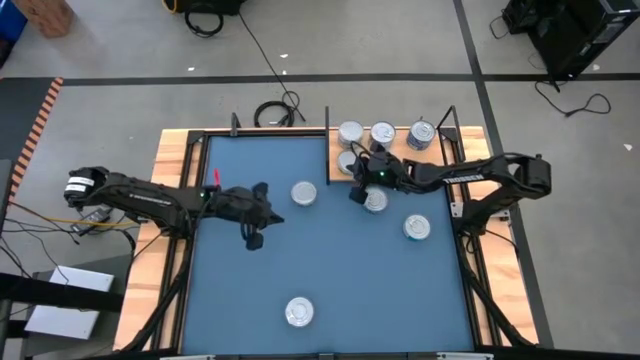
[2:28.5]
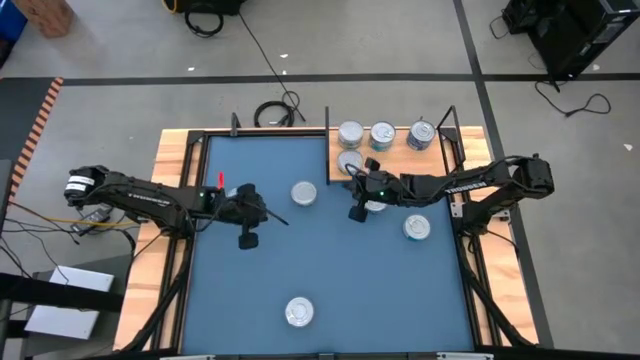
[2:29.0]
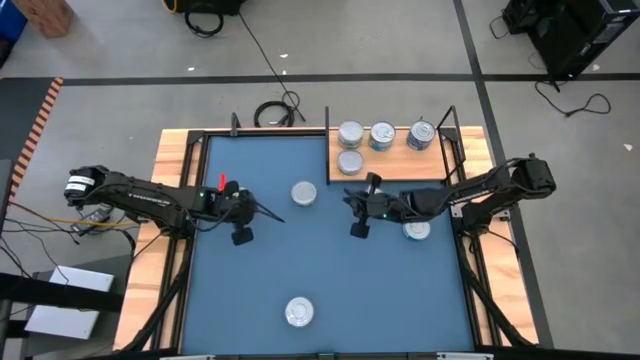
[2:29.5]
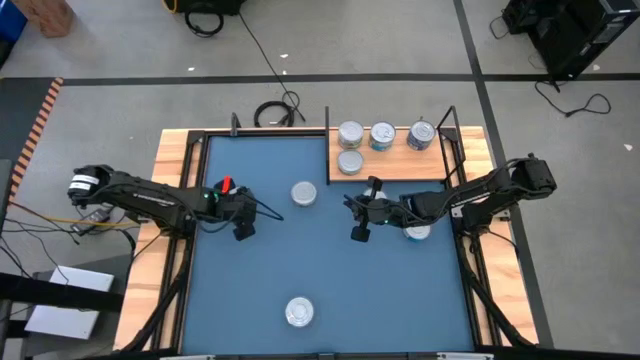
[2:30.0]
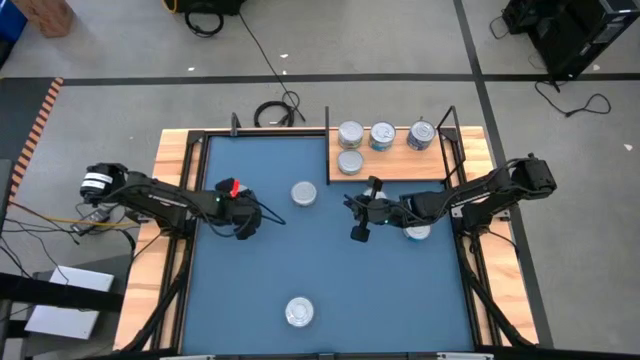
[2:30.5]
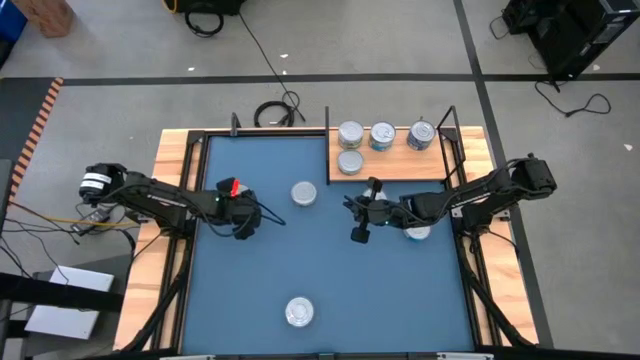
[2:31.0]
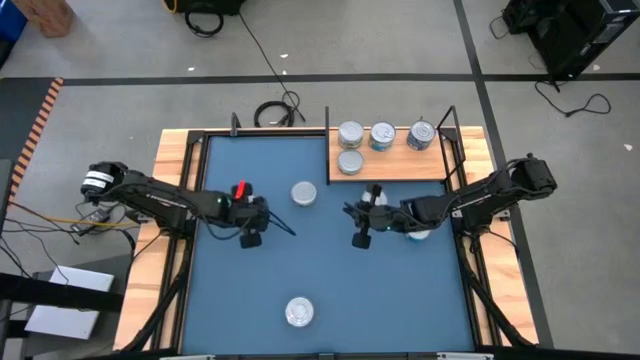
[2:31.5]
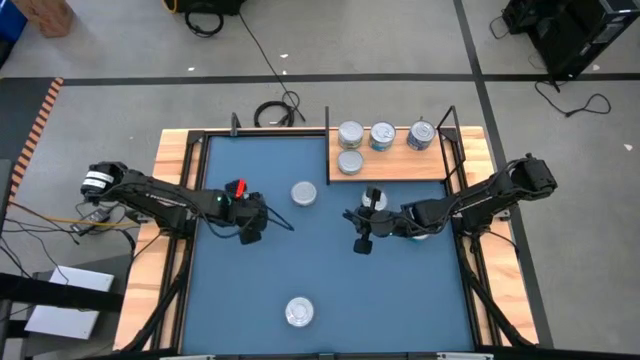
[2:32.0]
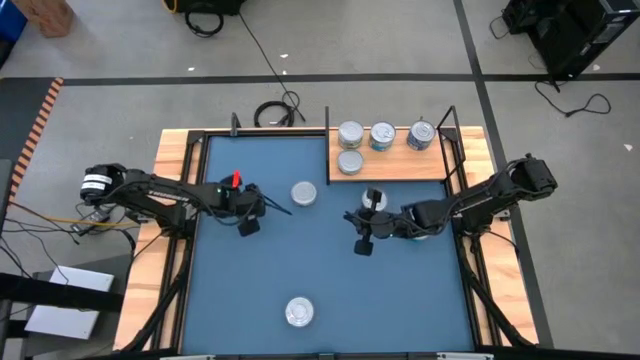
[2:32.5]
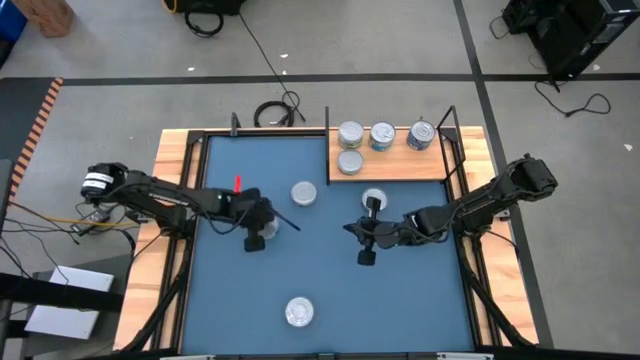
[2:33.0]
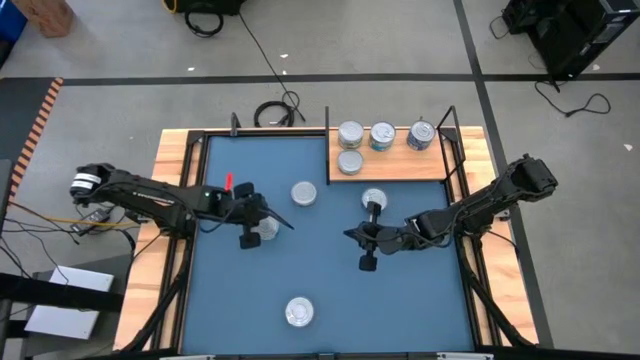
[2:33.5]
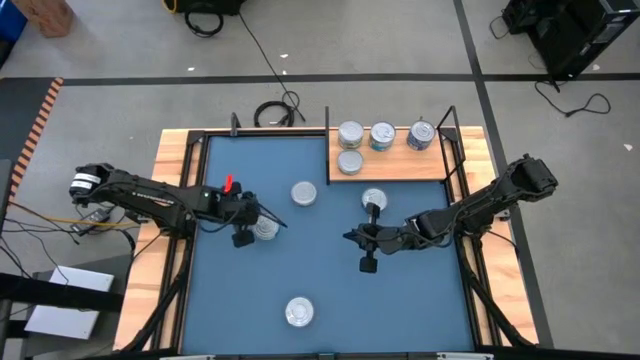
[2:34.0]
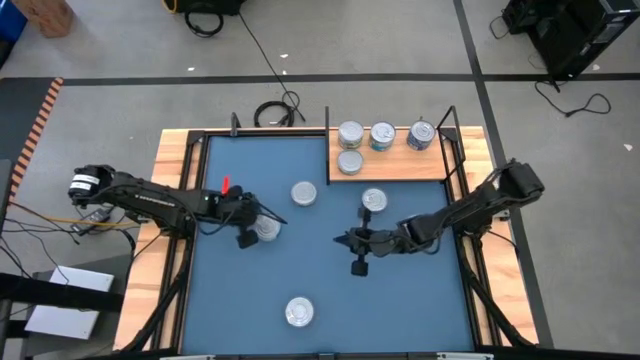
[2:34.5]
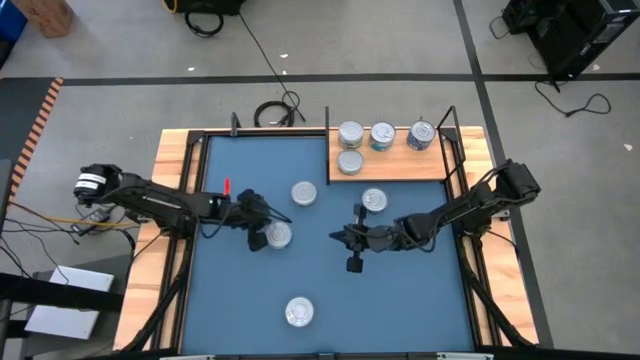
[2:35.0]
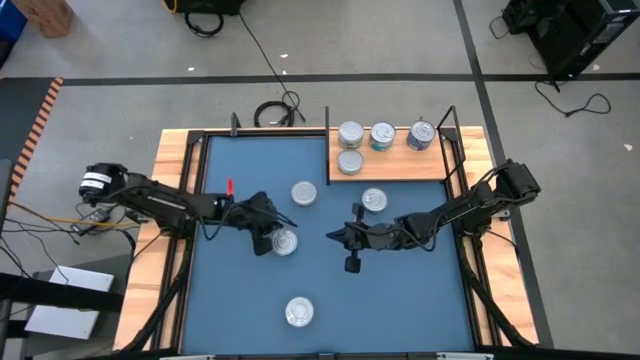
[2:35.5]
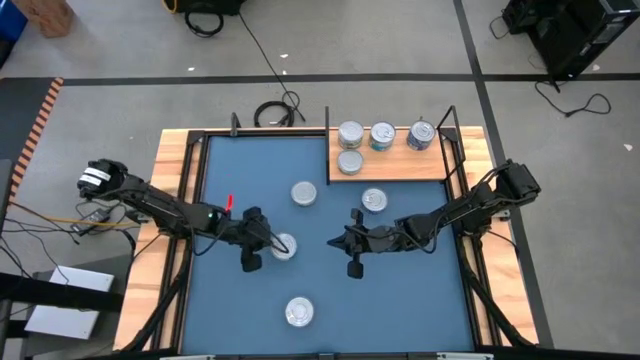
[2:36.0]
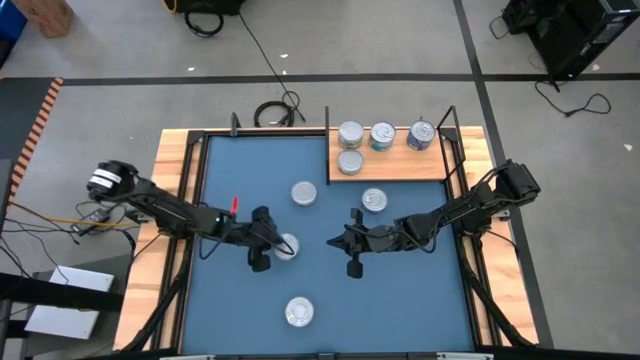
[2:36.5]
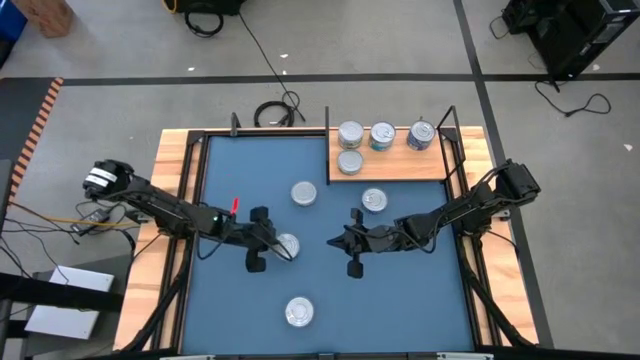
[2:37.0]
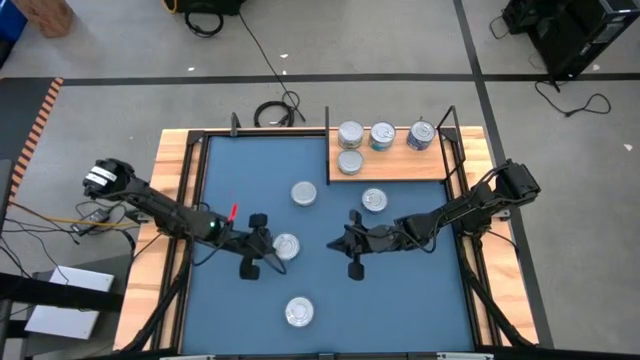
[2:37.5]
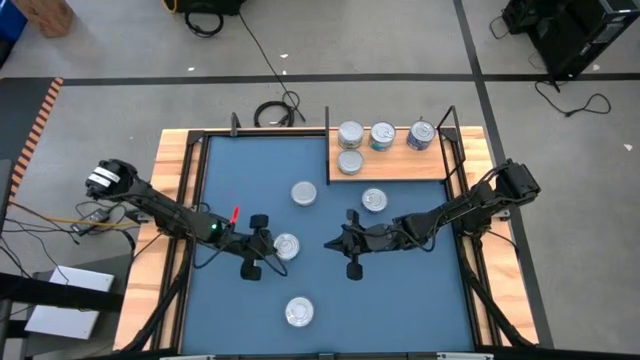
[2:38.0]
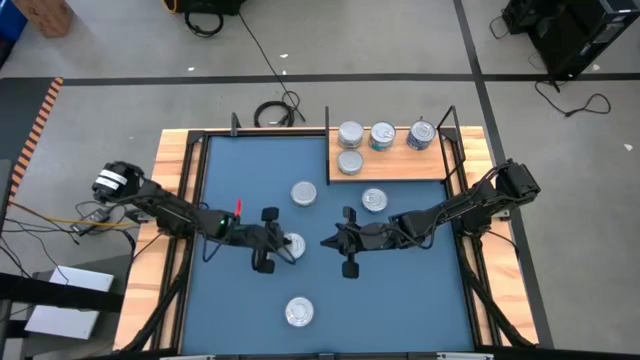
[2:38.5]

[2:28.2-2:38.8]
Task: Stack canned seafood by type on shelf
Put the left yellow and blue tuna can on the shelf aligned with the other yellow and blue tuna can

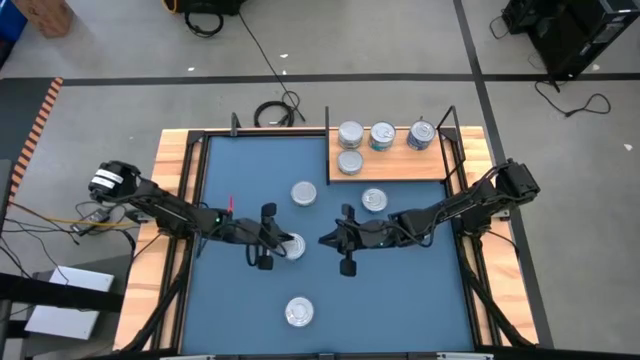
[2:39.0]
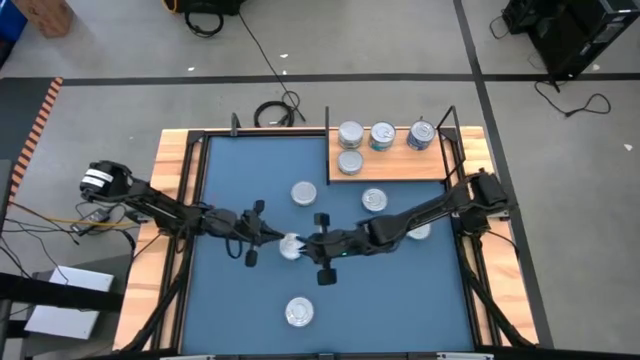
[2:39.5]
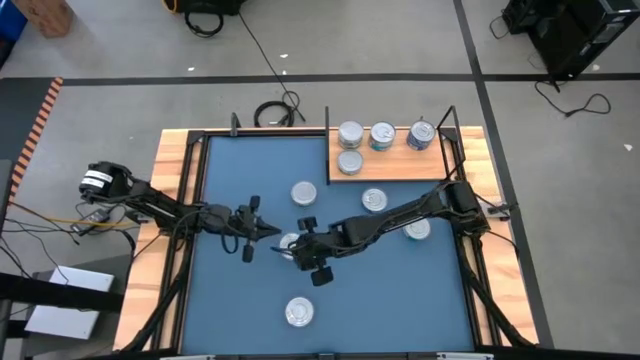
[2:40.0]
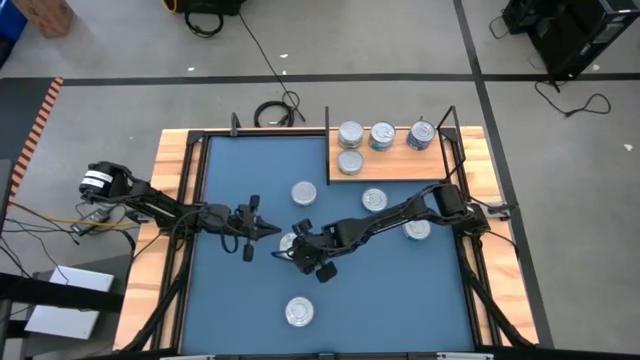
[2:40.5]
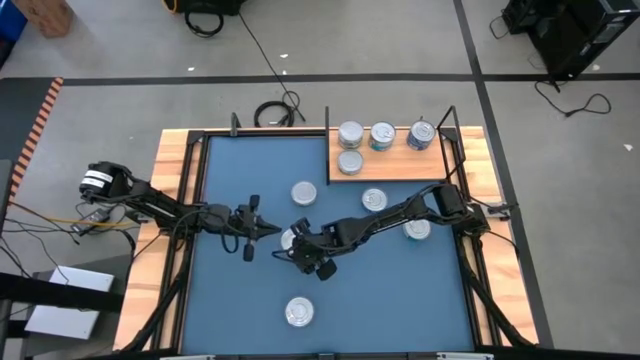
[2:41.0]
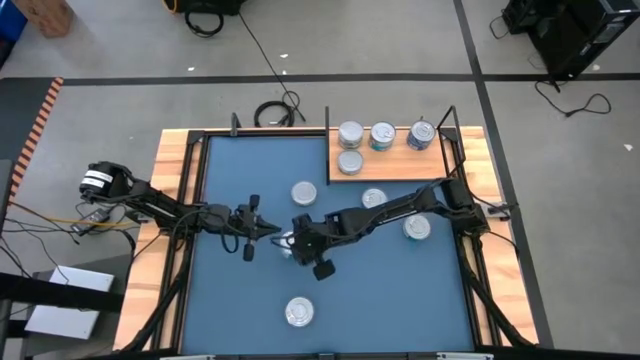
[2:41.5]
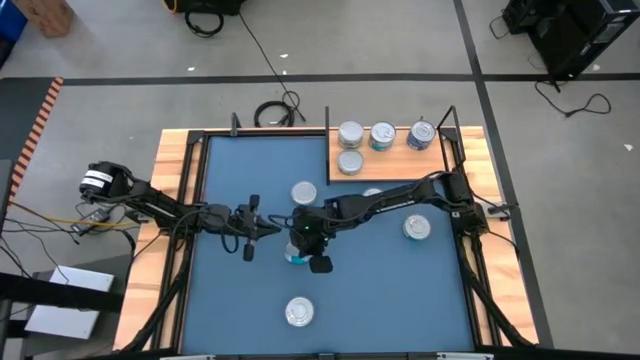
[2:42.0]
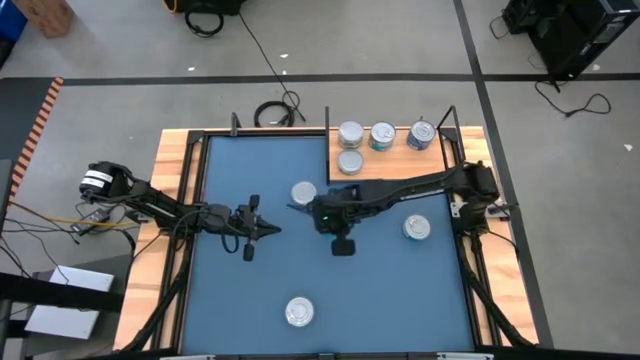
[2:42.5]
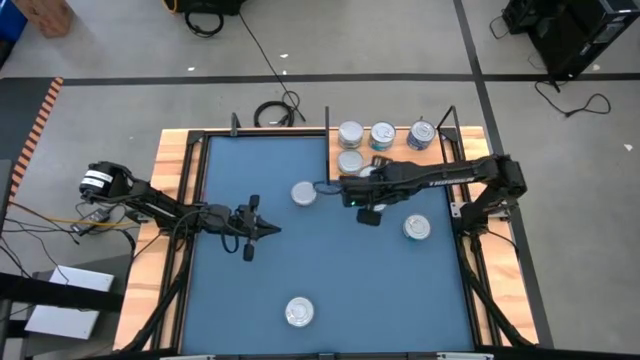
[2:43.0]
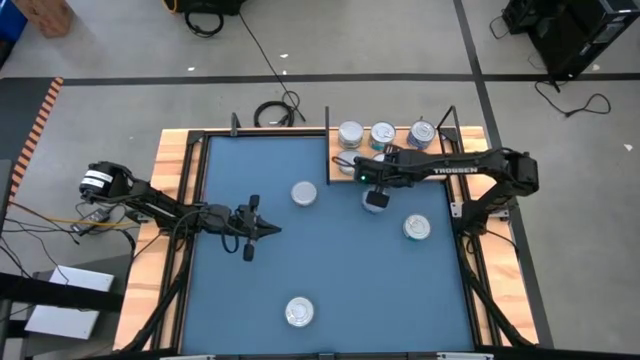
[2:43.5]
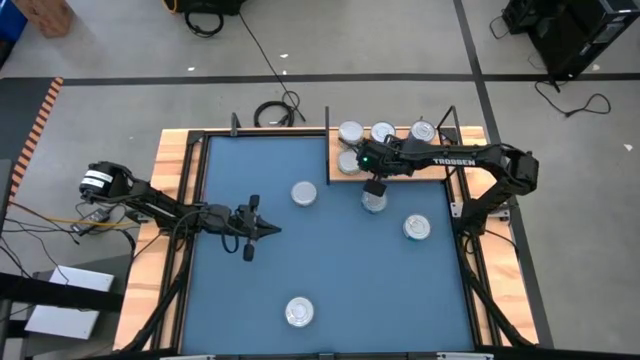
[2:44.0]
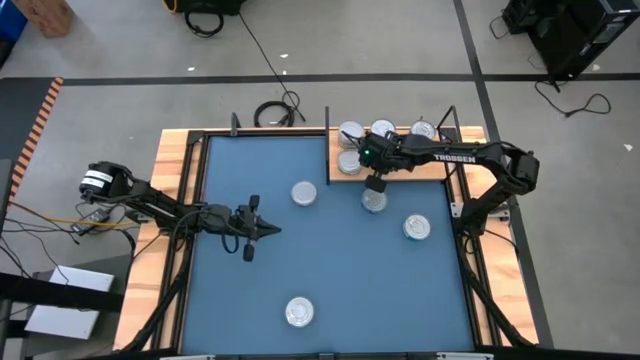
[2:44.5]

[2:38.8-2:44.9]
Put the yellow and blue tuna can on the shelf aligned with the other yellow and blue tuna can

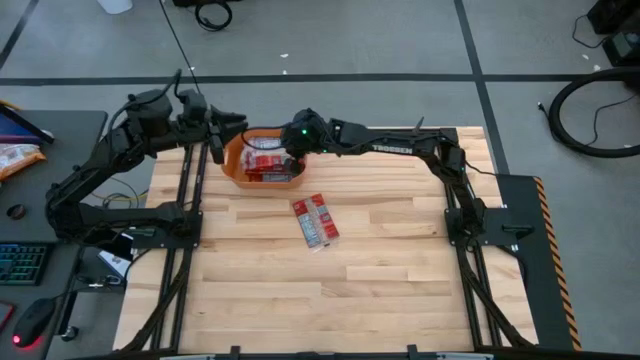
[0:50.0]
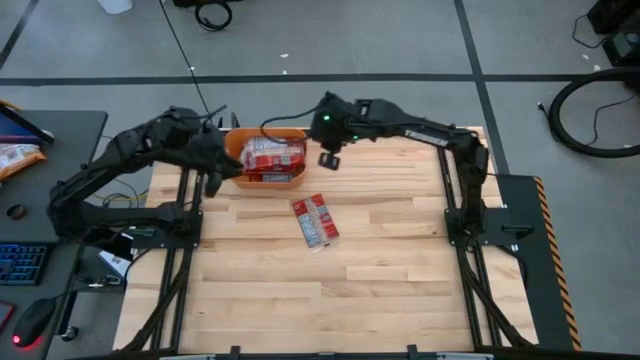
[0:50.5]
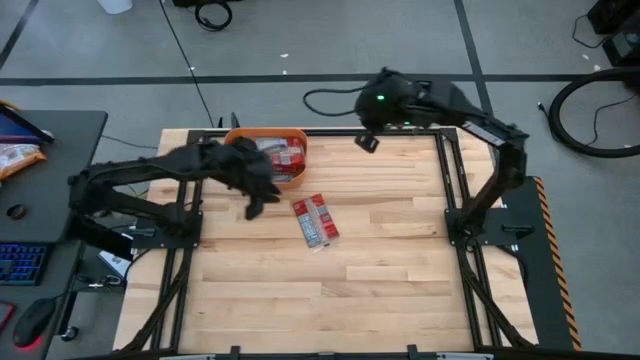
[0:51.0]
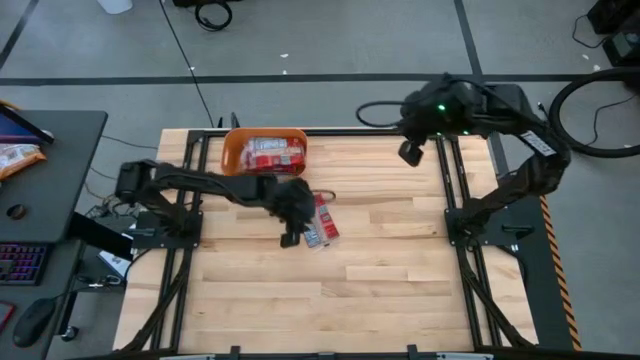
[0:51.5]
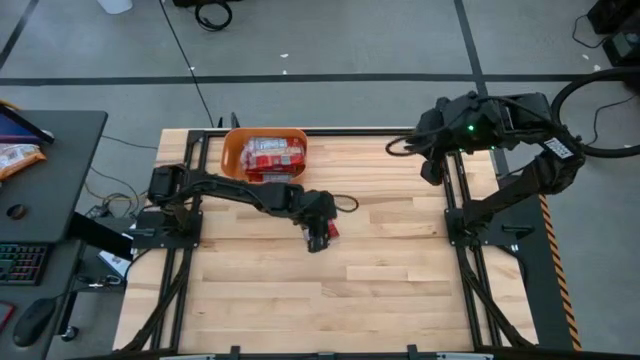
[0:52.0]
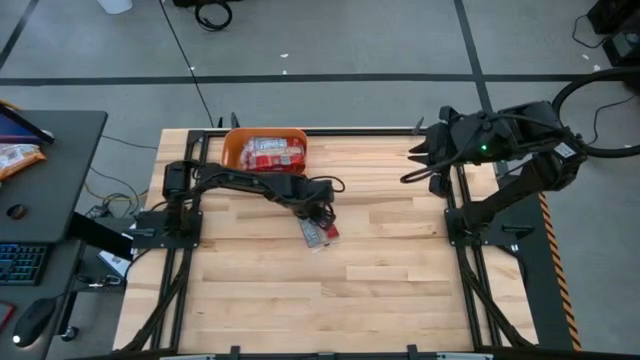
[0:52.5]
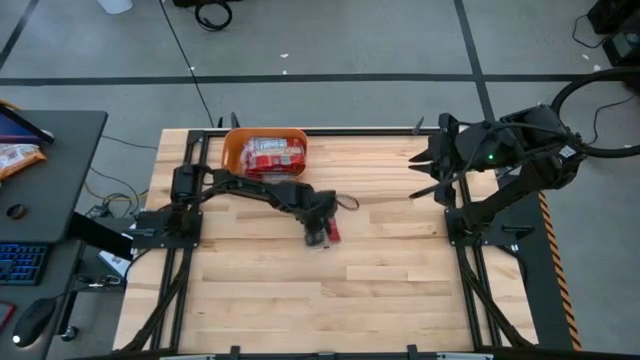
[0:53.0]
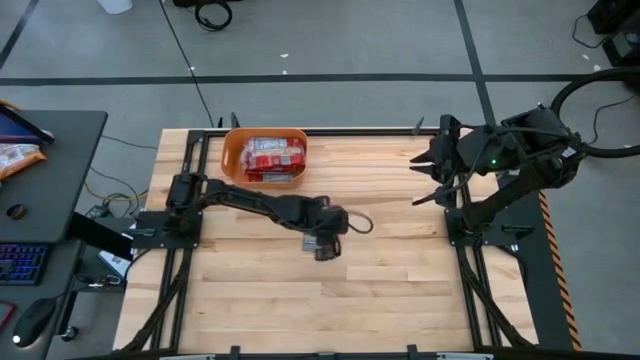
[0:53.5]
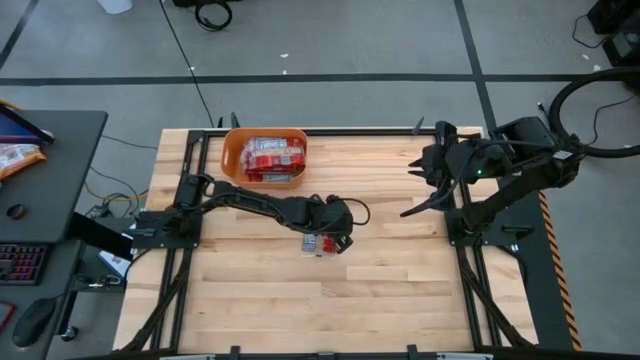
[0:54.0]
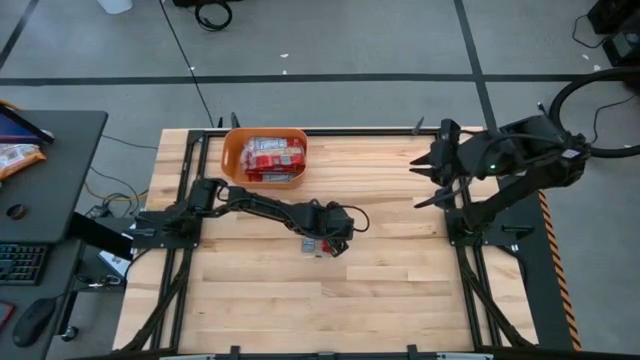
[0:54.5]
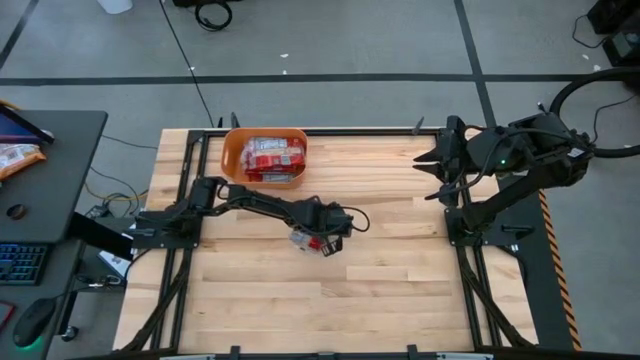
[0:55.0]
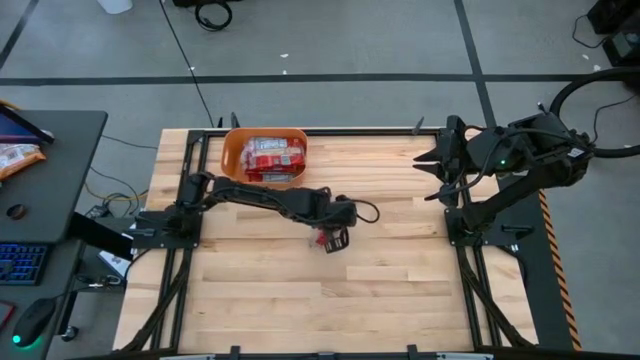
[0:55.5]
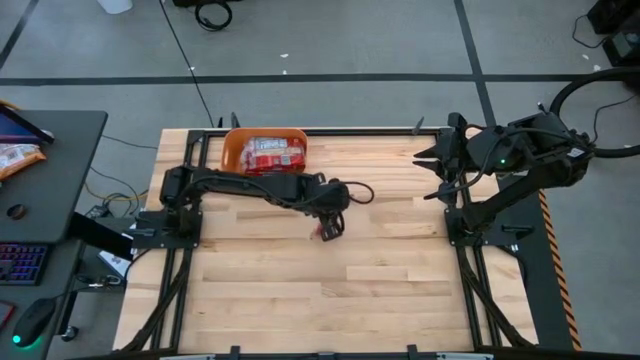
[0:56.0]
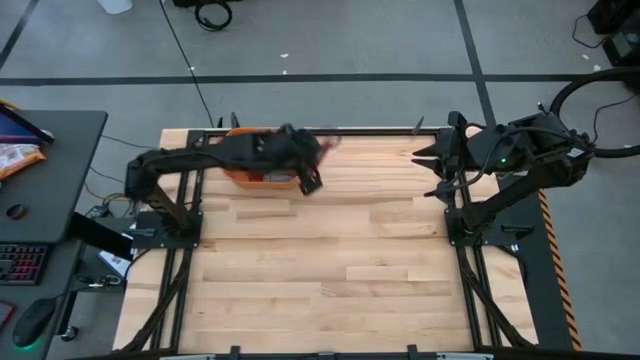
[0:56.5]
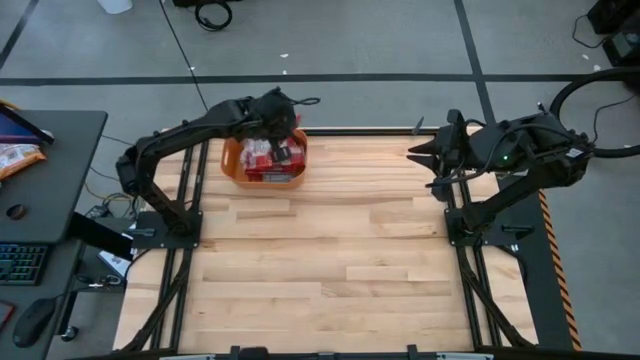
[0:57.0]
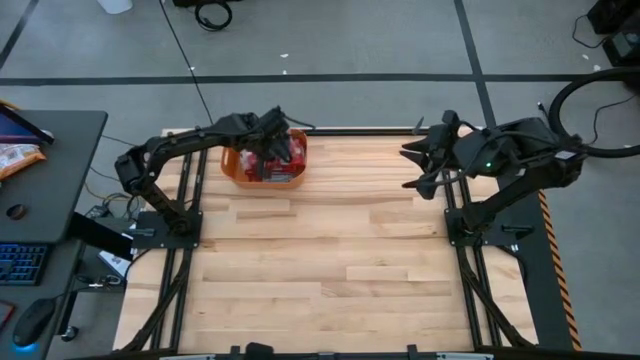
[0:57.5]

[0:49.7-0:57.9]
Task: Sort popcorn bags into baskets
Put the red popcorn bag into the orange container
